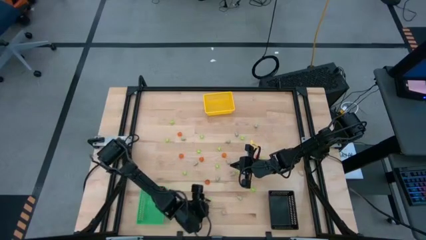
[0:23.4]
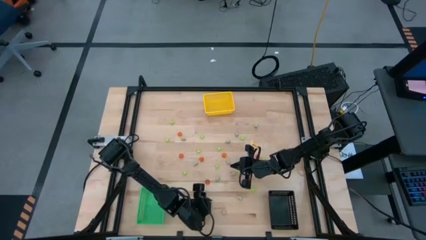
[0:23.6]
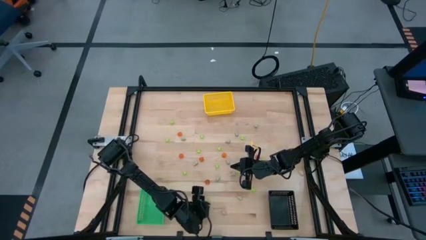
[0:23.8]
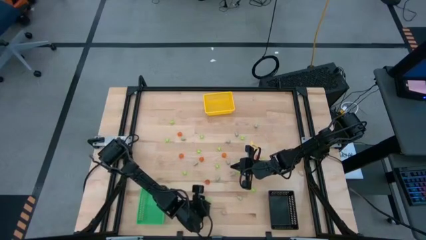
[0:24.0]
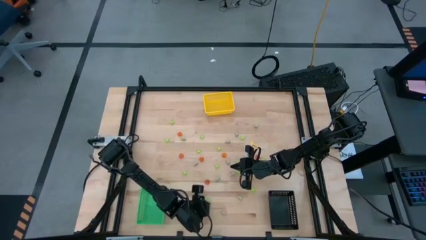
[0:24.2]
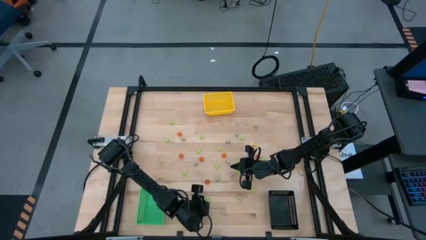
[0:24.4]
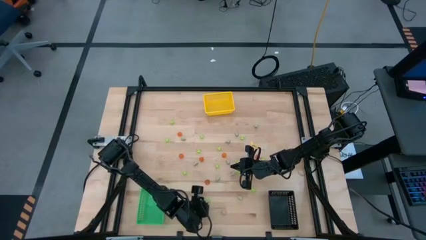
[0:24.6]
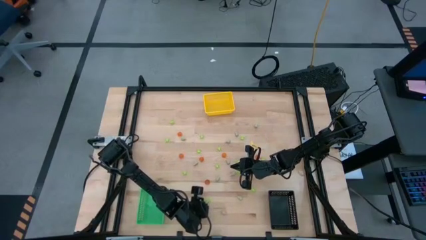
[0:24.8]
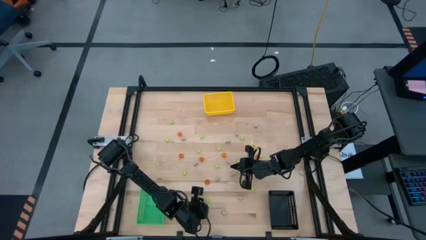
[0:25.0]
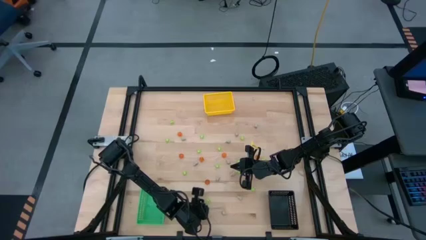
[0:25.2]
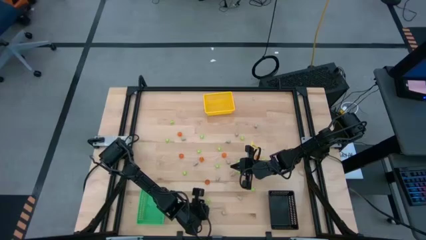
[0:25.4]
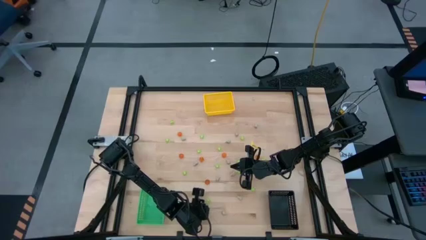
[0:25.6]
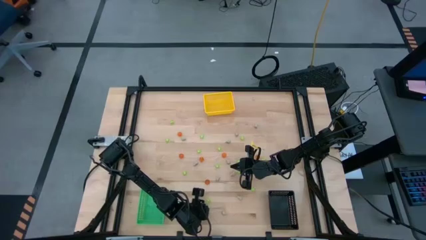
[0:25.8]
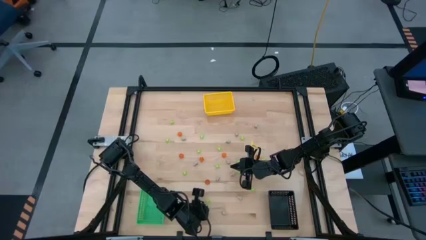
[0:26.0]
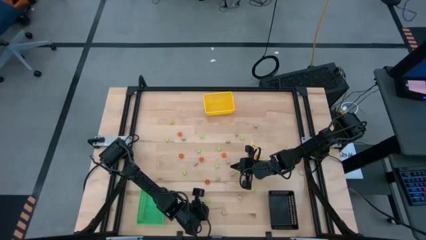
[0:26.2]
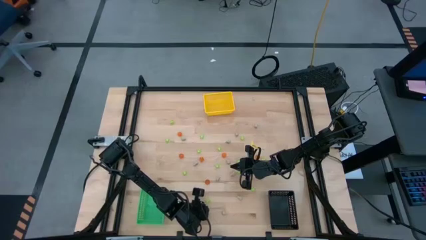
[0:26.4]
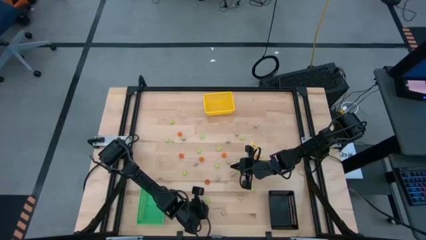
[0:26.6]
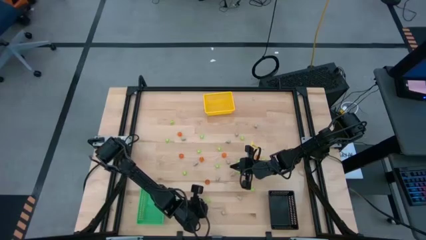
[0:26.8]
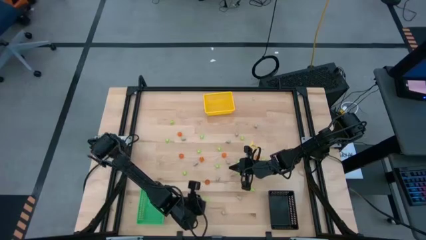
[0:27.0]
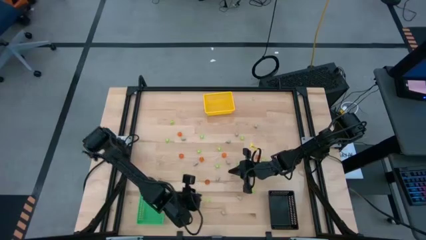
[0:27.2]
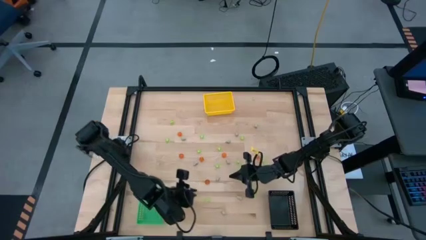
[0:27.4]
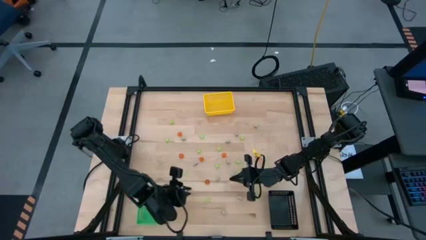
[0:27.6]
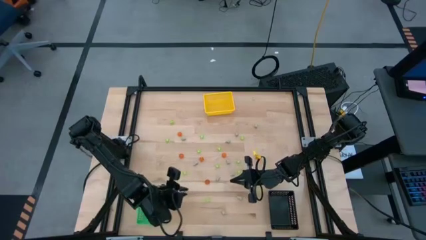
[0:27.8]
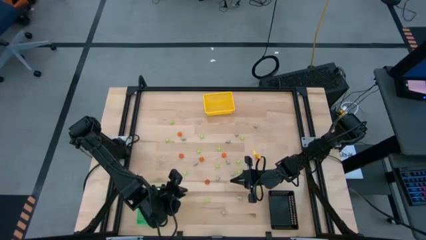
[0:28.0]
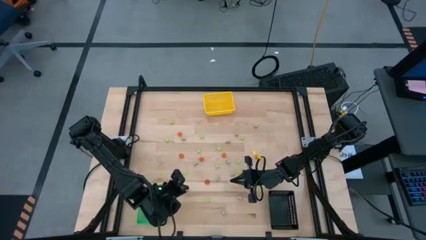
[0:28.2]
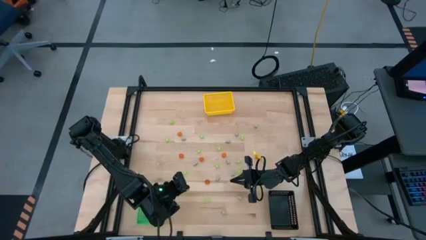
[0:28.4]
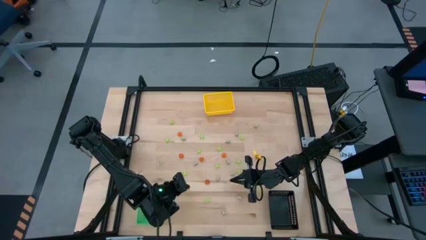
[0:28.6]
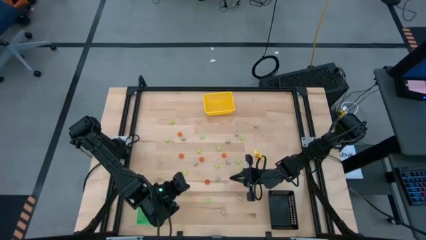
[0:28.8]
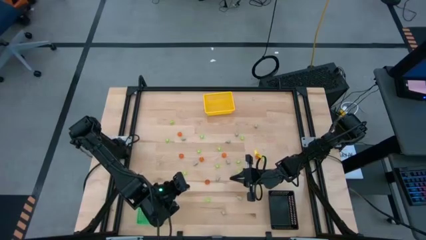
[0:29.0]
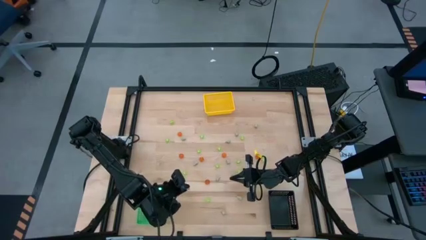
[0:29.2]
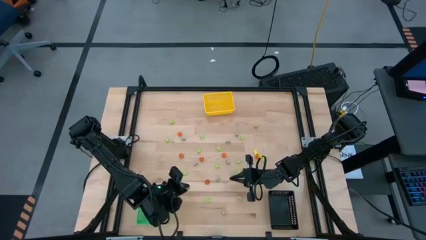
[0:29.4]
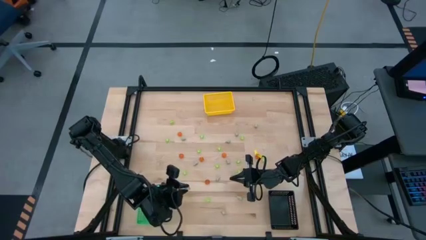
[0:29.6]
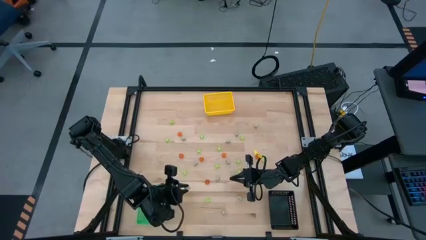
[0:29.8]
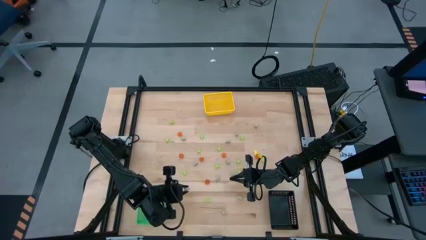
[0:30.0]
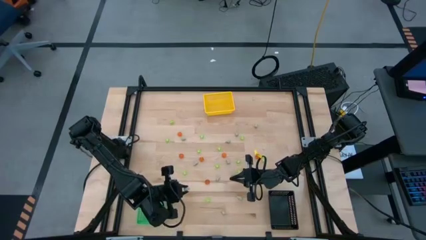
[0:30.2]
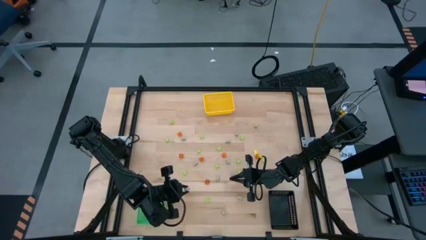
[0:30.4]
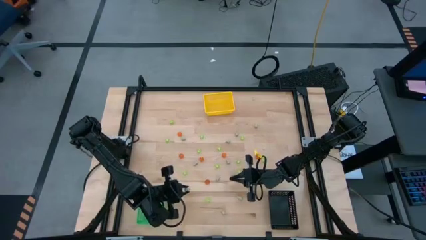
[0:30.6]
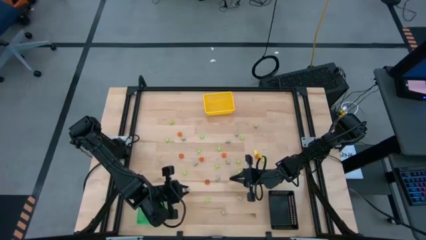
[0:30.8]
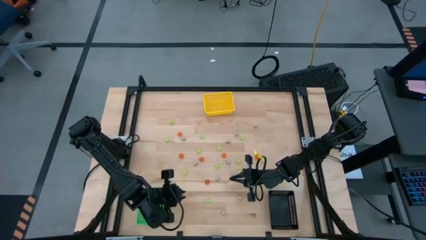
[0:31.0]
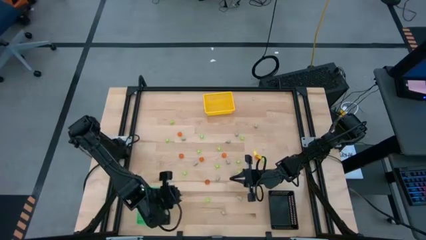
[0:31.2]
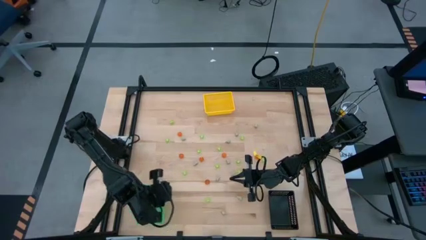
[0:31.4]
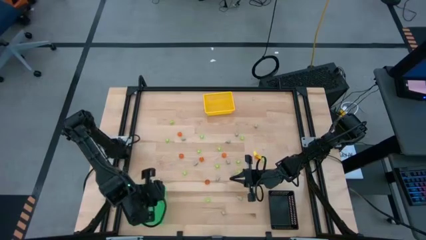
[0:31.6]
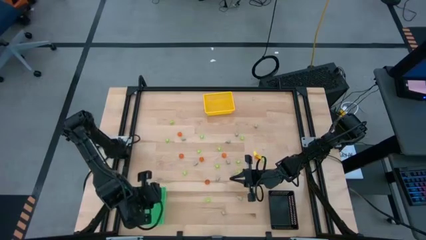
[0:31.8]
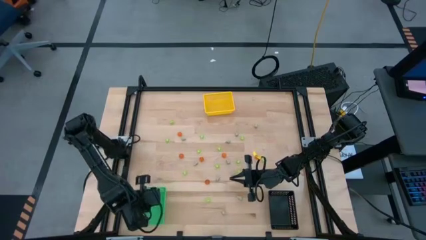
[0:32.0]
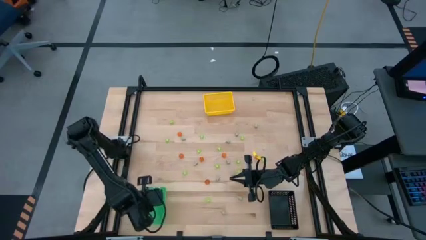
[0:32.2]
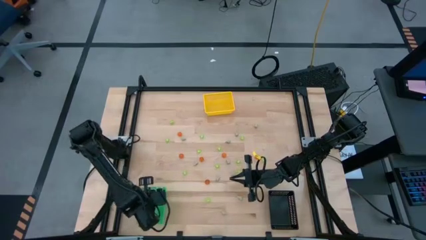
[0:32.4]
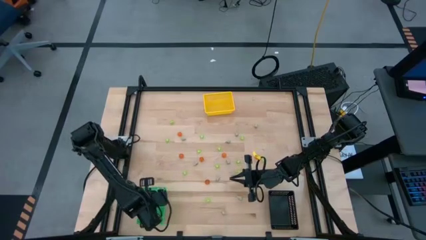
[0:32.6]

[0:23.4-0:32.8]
Task: Sort Halloween decoration
Put the white skull toy into the green bin

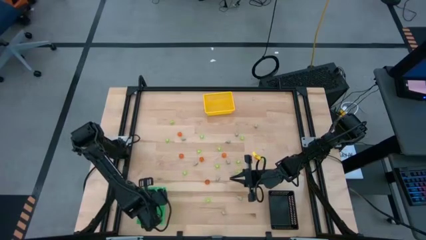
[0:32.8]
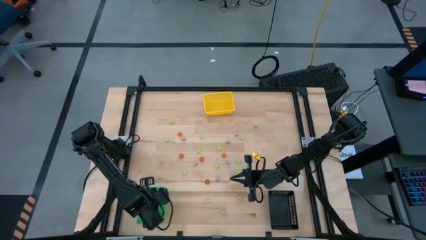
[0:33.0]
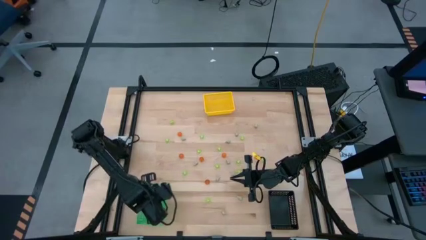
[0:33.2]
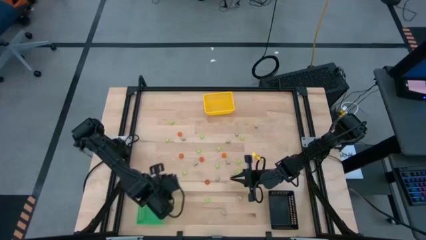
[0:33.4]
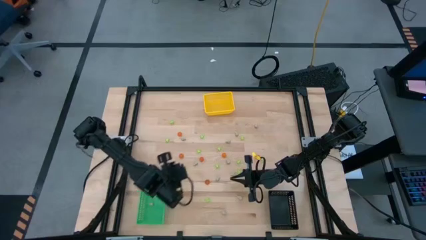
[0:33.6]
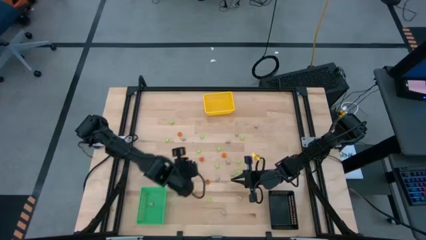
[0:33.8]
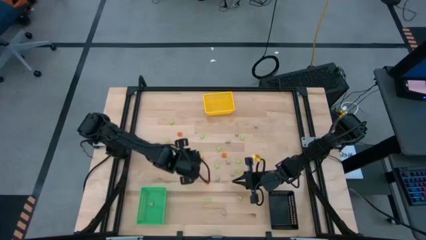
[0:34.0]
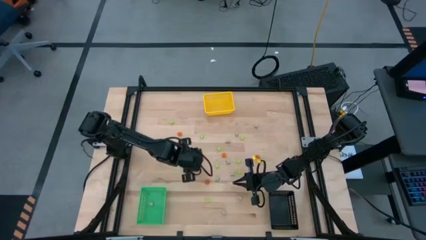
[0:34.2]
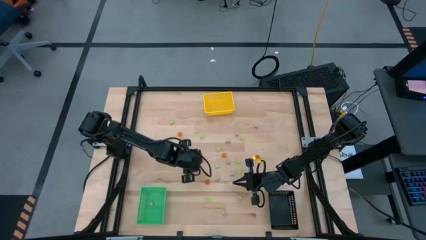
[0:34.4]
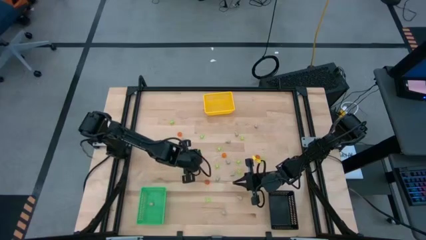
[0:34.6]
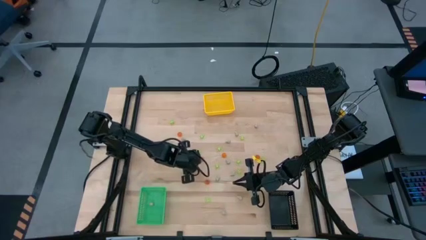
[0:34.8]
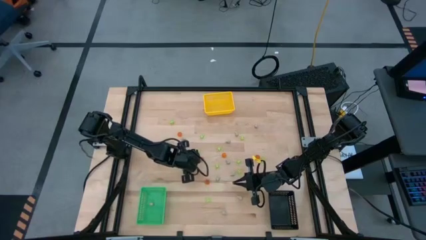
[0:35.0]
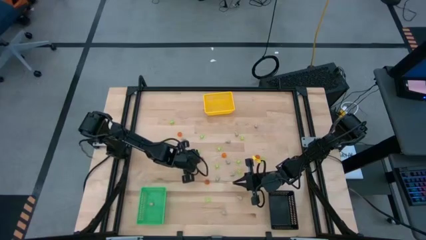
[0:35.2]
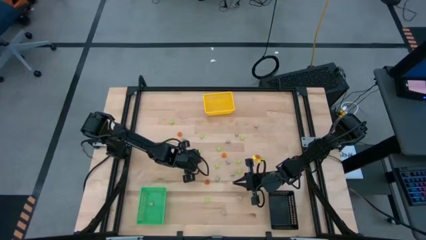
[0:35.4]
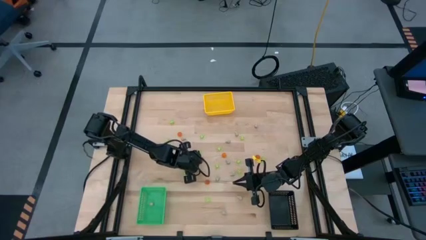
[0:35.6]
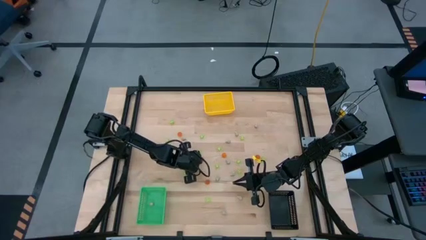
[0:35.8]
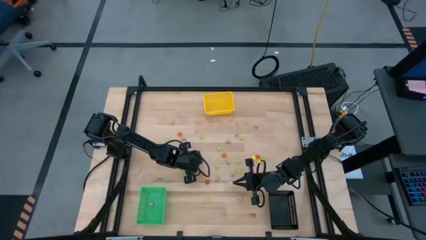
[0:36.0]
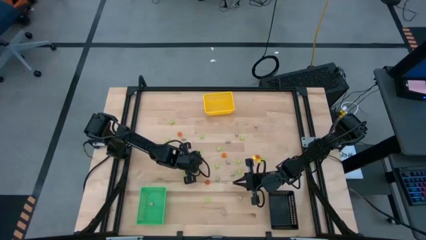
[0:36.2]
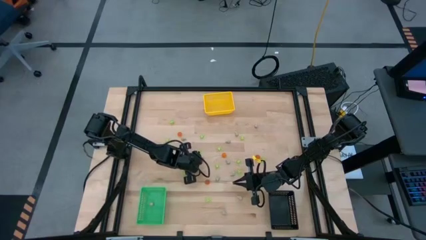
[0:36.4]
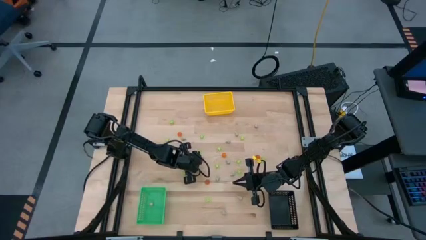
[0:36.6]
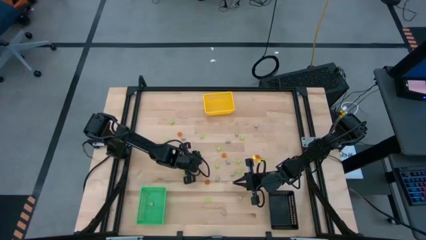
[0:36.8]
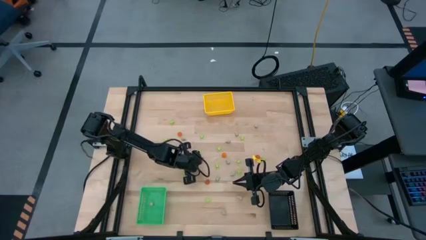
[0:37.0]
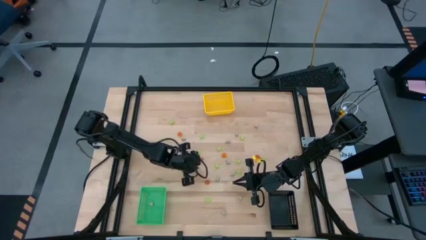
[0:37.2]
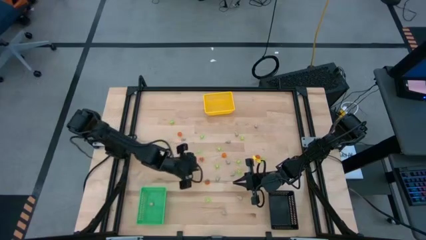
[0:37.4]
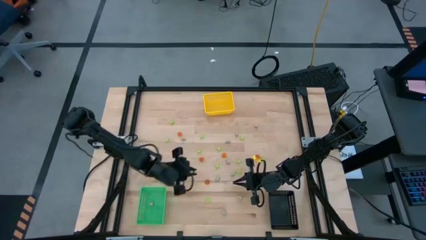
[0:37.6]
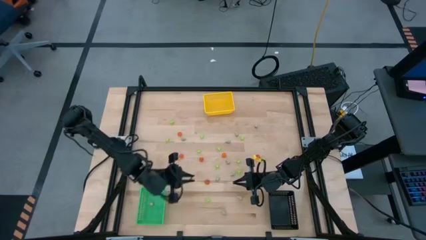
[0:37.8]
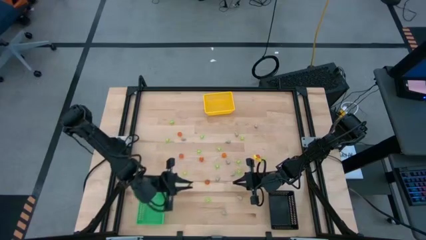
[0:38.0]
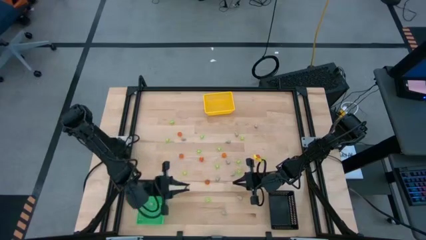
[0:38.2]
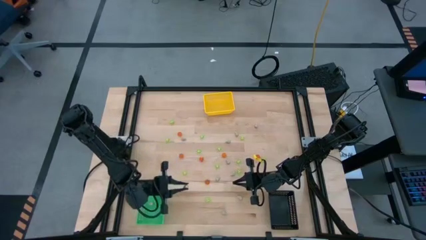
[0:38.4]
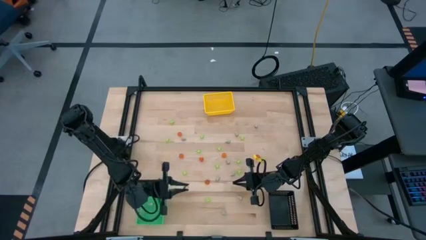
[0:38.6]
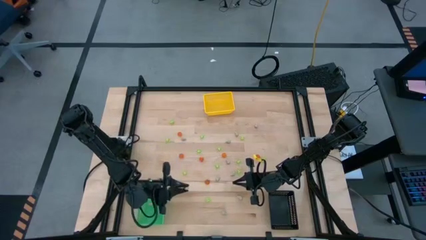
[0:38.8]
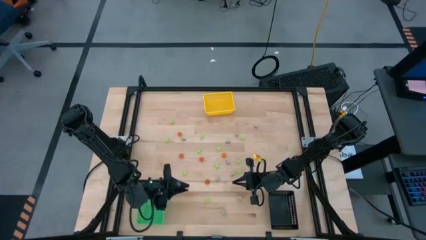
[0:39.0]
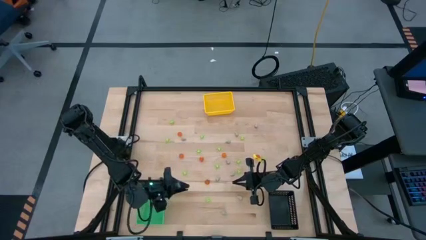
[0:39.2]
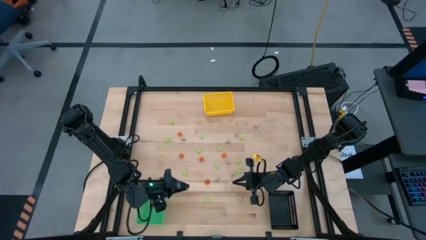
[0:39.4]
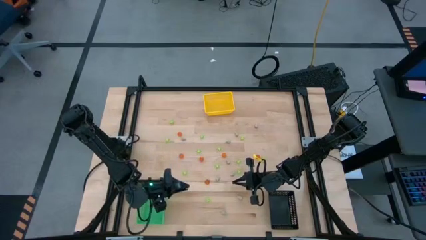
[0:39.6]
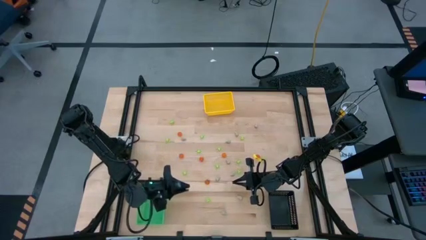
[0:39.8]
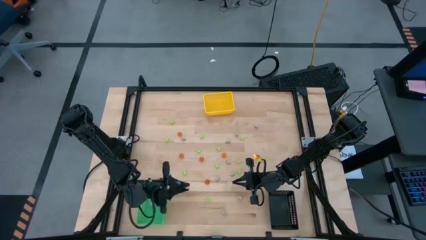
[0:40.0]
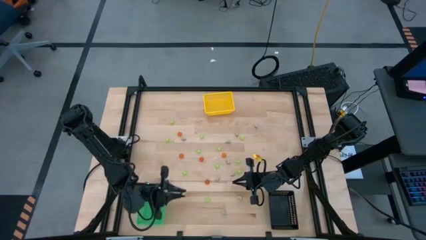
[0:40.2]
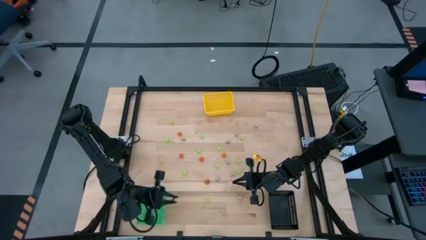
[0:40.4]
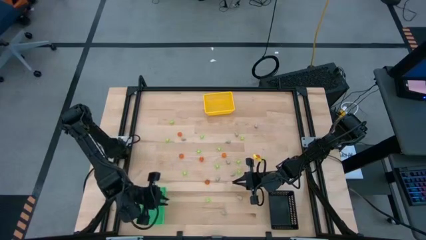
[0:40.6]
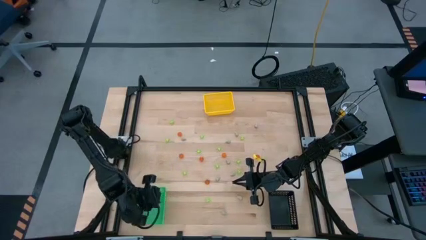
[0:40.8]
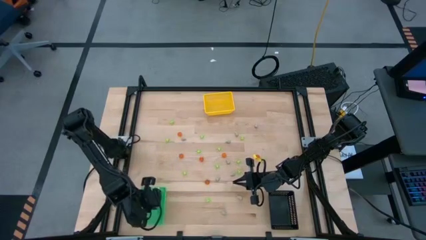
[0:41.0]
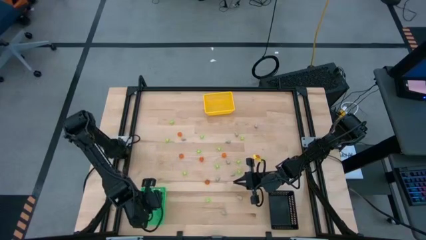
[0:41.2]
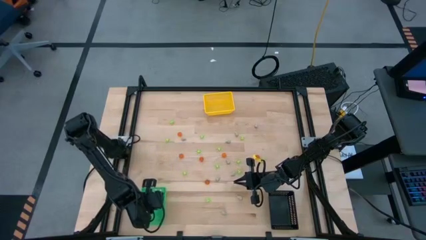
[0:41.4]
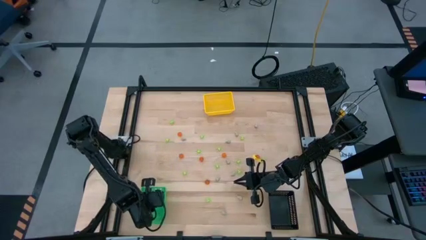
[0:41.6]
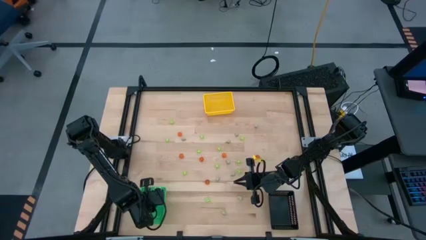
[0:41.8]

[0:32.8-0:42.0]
Put the white skull toy into the green bin
